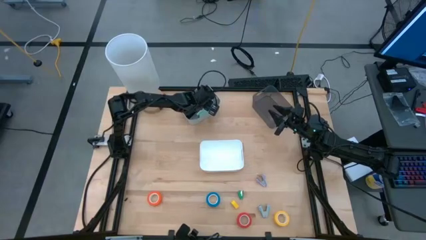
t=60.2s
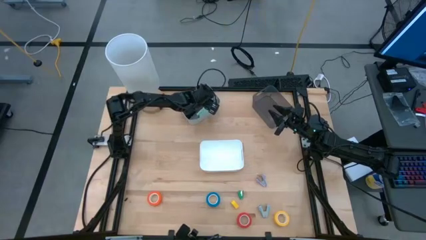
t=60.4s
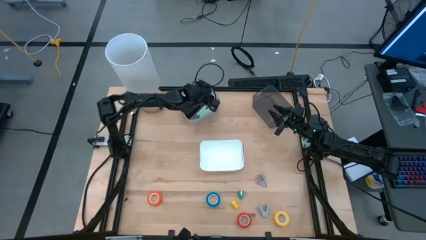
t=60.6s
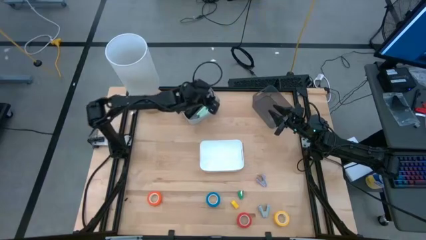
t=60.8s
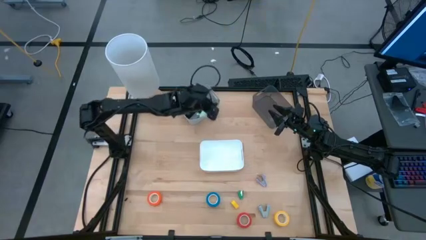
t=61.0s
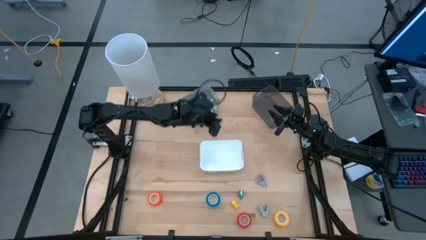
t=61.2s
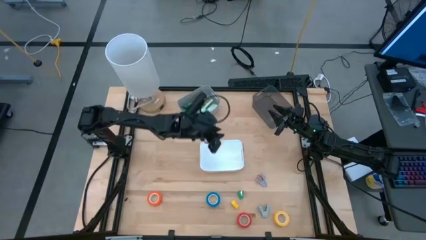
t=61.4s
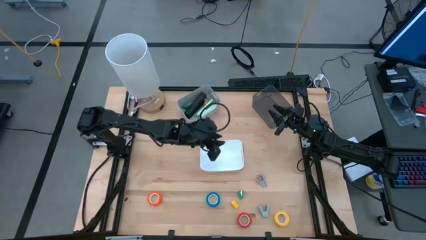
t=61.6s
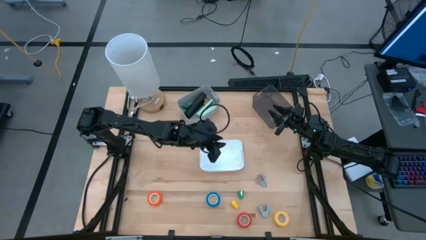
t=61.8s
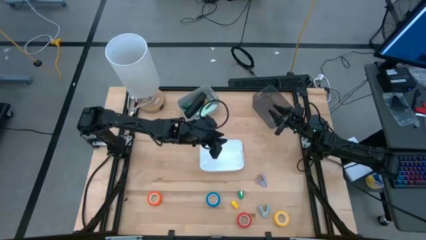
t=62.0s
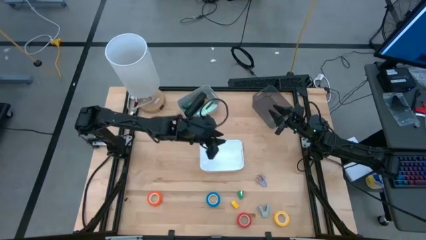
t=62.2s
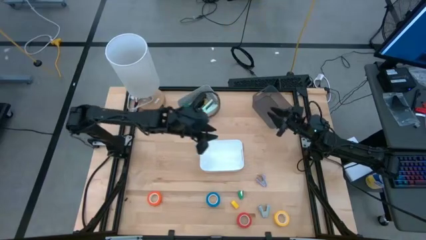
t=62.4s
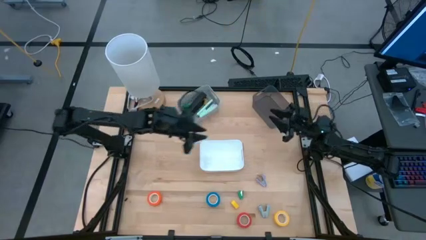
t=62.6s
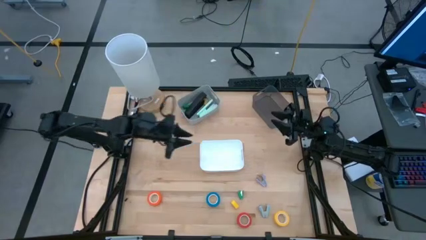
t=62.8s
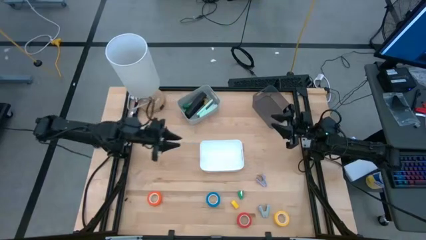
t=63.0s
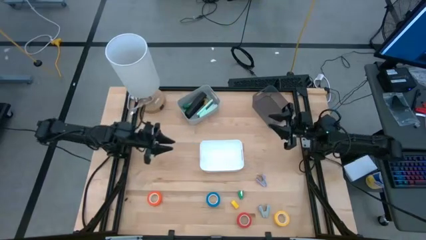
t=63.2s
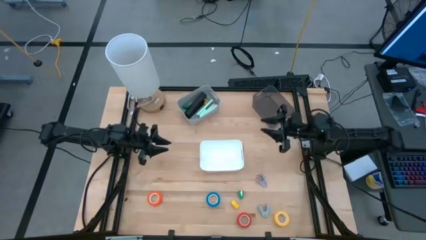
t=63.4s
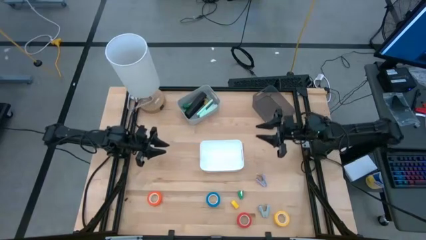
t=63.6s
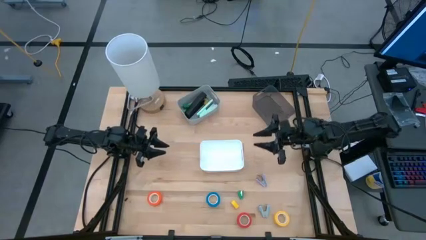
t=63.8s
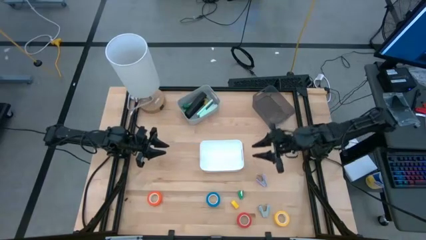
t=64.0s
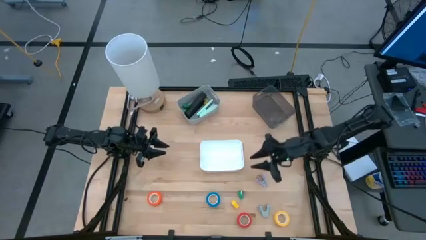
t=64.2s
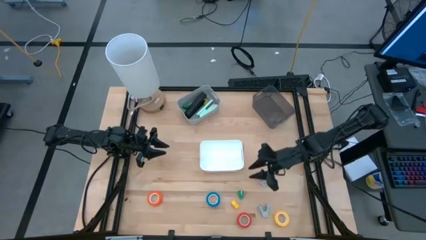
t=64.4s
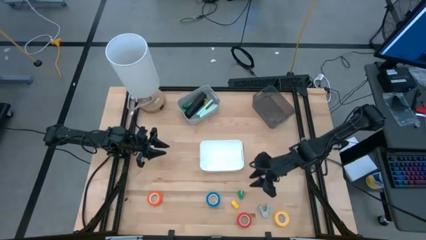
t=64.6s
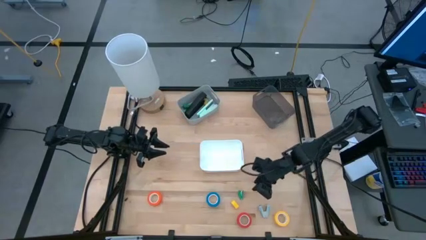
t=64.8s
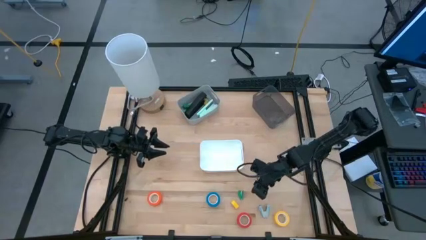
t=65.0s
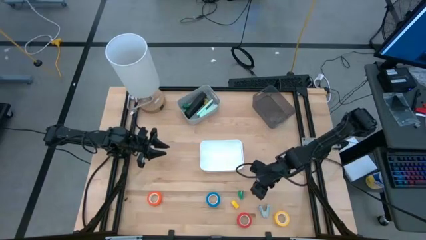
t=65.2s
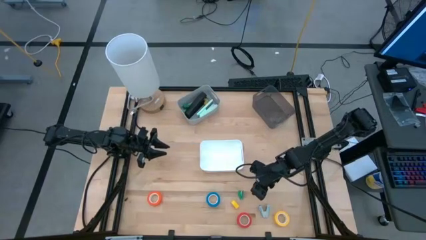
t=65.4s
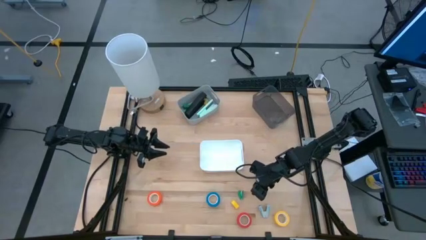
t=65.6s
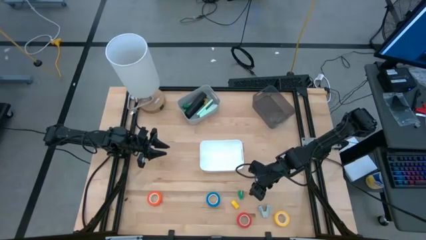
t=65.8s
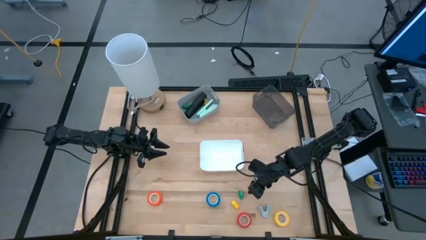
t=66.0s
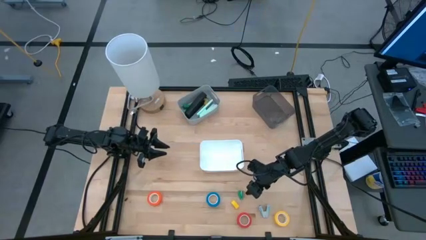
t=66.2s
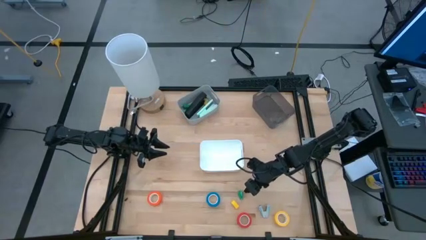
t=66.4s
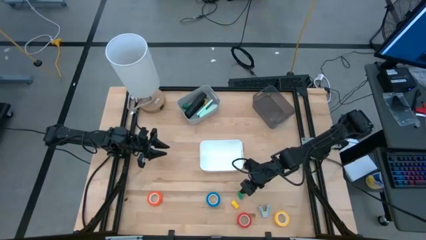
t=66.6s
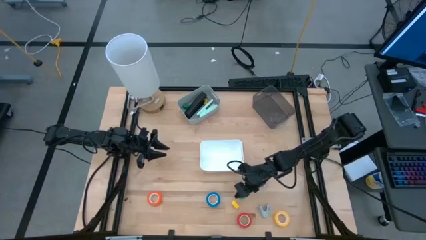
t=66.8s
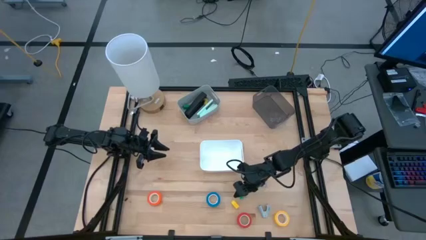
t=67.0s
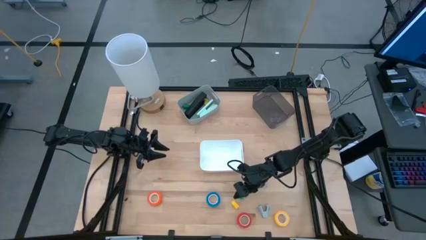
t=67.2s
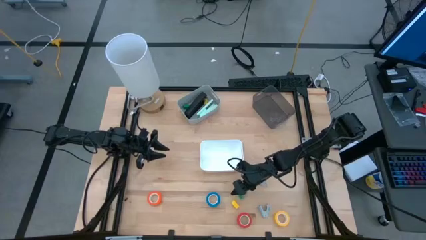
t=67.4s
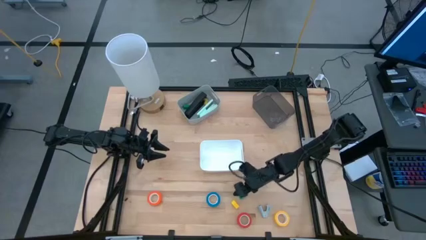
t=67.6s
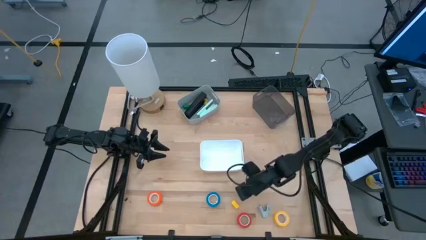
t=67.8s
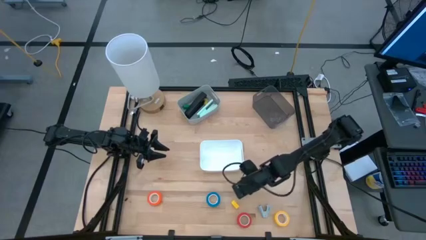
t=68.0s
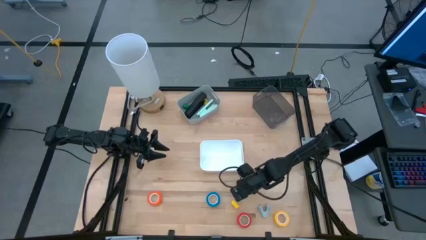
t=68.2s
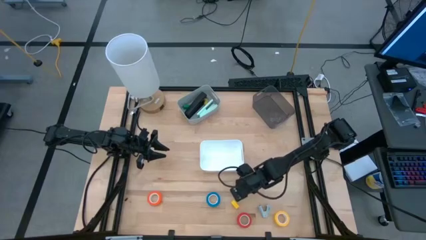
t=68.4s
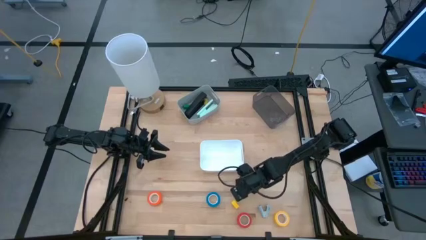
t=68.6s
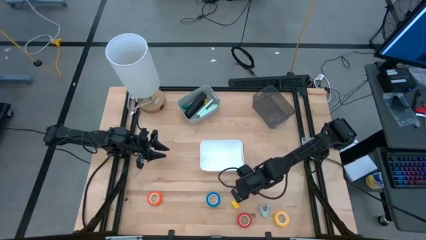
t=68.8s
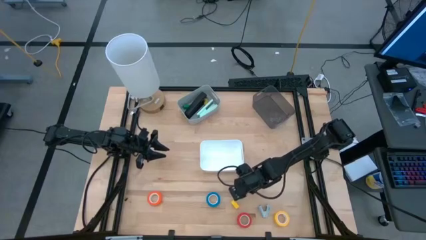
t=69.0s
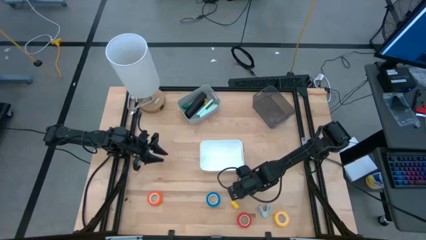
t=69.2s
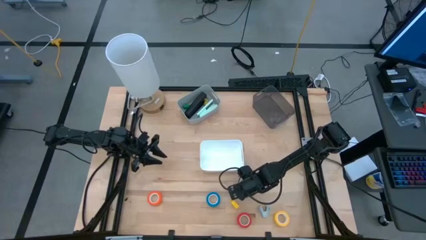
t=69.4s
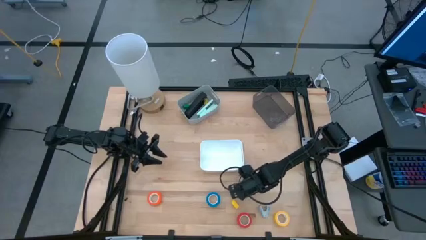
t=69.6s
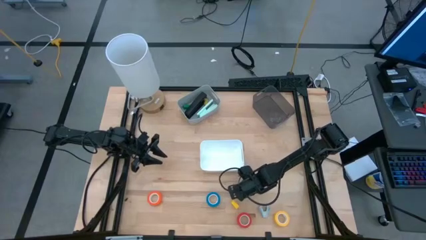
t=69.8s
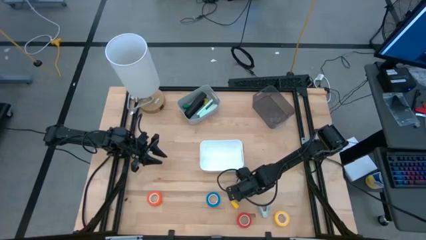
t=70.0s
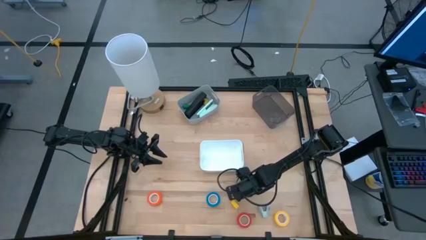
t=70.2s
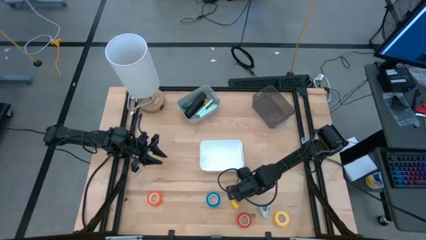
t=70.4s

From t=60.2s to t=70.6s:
Task: Pick and place Stapler, Stapler remover, tape
Put the green stapler into the gray bin

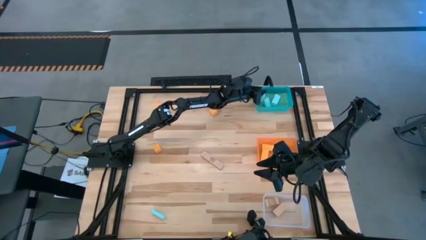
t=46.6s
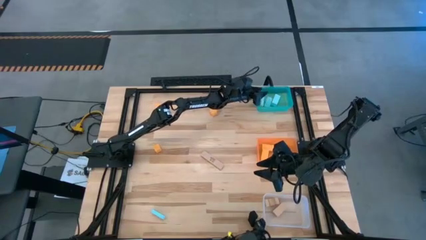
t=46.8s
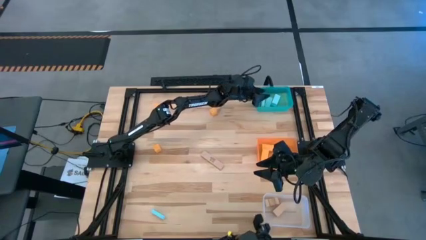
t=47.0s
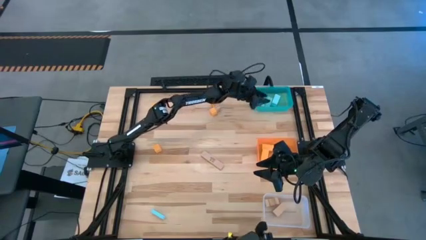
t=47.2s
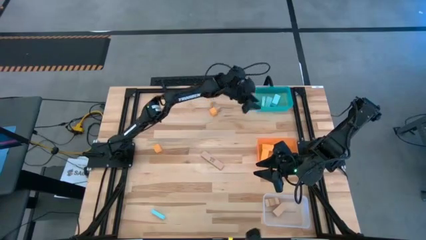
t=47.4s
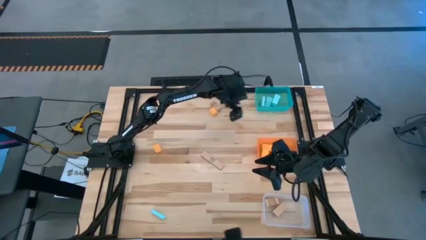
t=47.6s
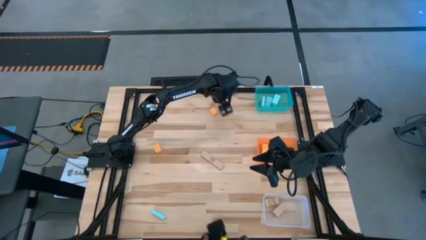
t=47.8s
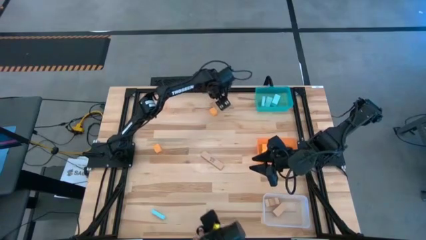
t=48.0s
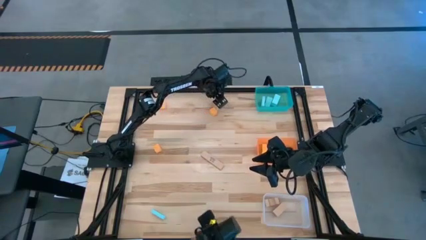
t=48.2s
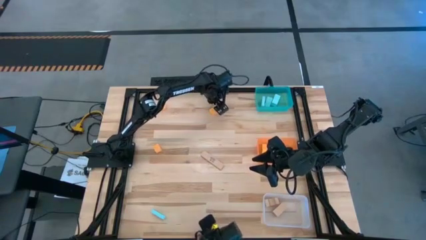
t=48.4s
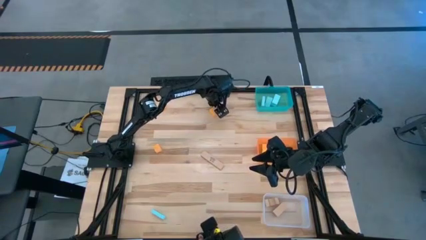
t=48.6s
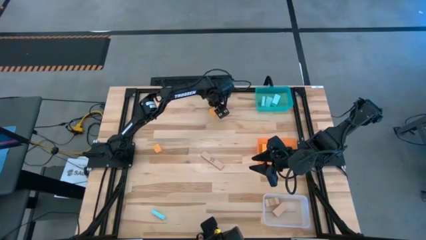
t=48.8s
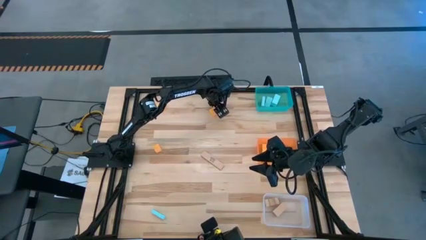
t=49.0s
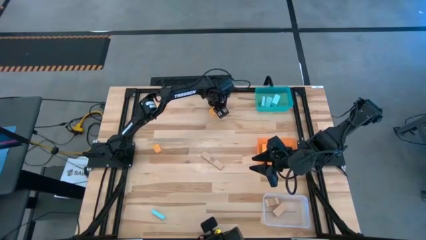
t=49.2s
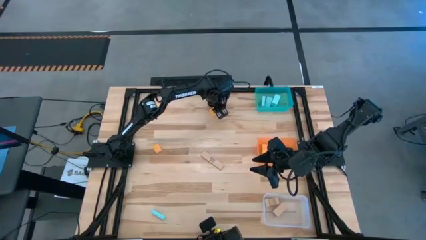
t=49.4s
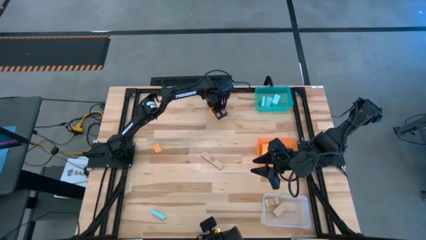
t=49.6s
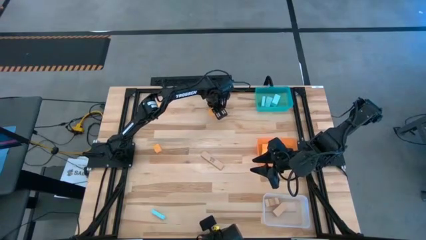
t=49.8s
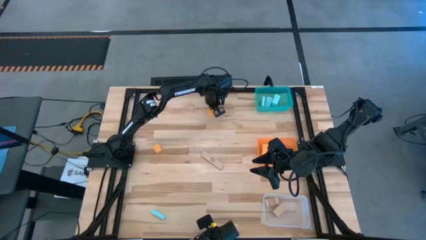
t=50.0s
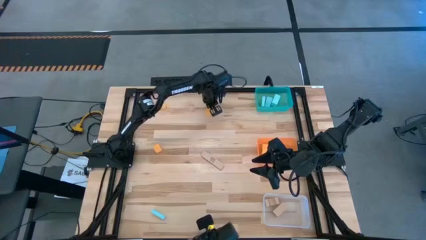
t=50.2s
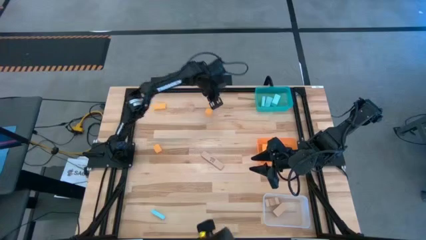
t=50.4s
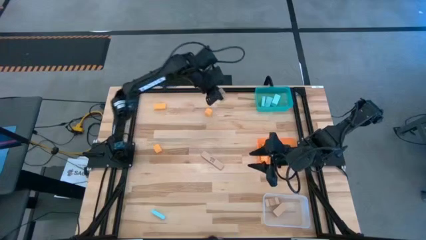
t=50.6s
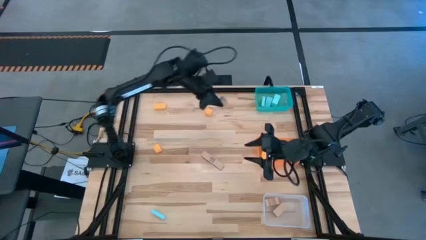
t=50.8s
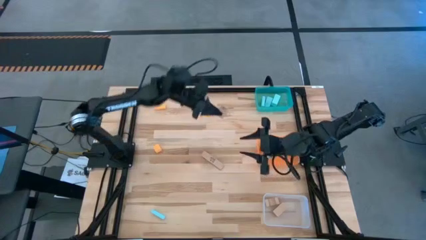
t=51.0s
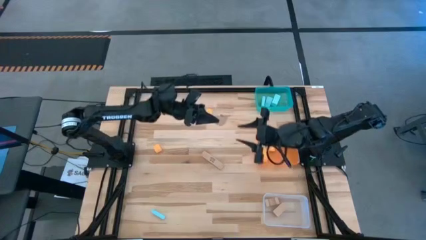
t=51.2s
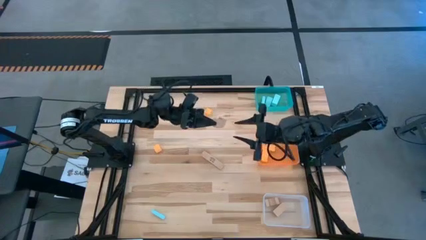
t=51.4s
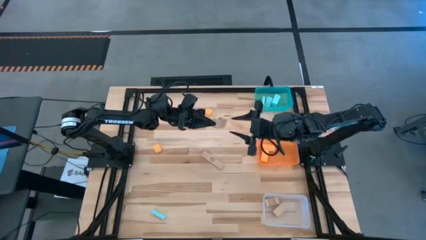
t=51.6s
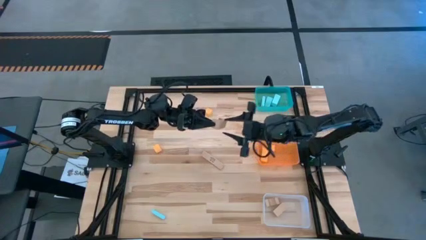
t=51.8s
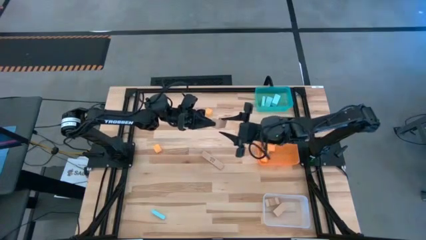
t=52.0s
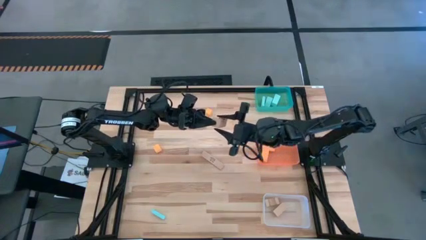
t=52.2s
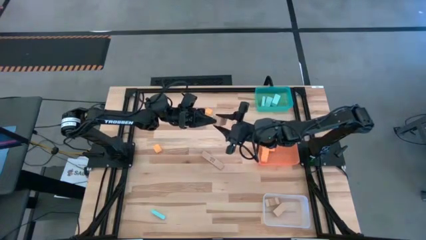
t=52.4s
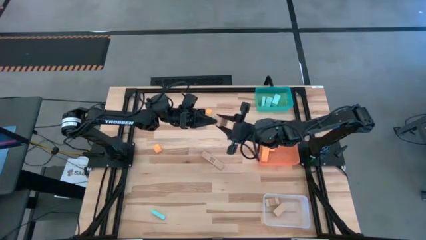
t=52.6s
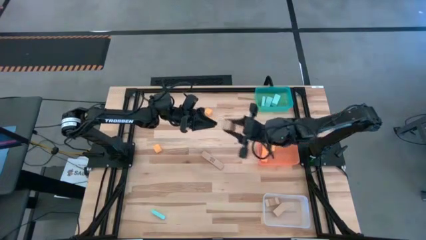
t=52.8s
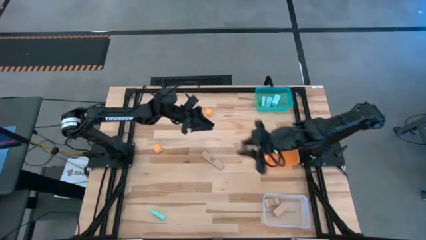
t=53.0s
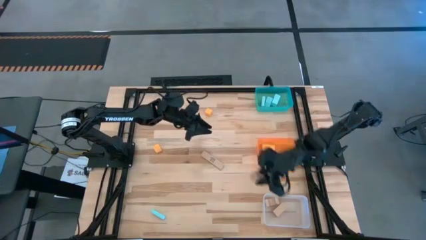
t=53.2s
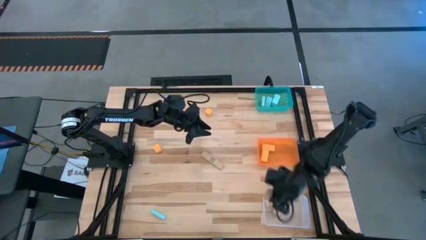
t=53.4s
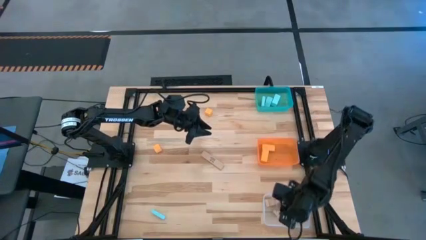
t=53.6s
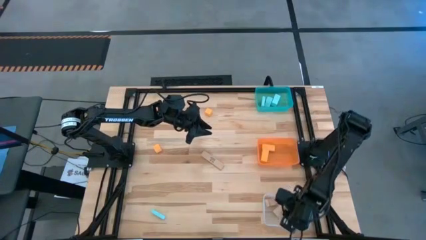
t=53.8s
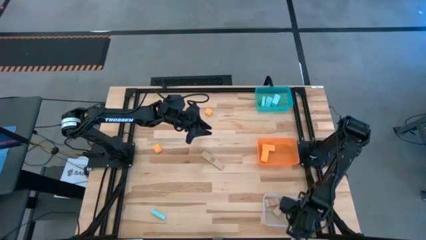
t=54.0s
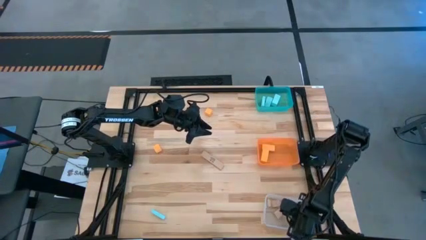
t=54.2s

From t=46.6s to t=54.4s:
Task: Sort & place blocks by color
Put the brown block into the transparent bin
